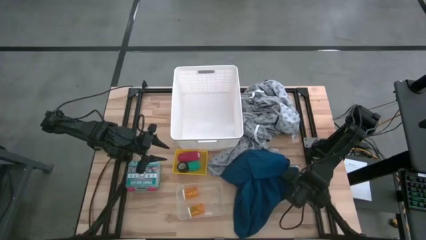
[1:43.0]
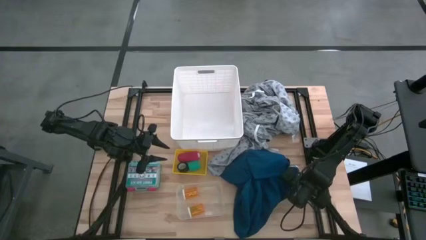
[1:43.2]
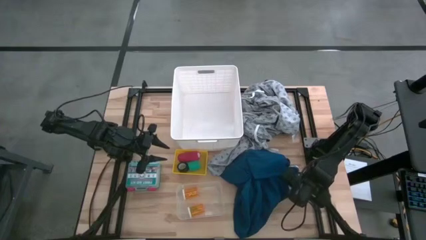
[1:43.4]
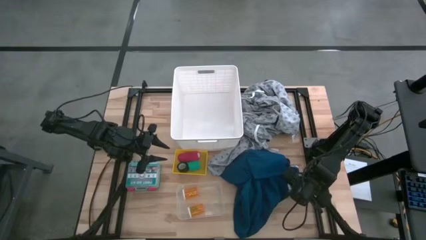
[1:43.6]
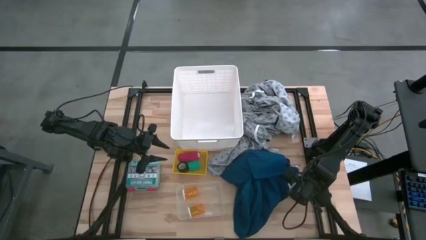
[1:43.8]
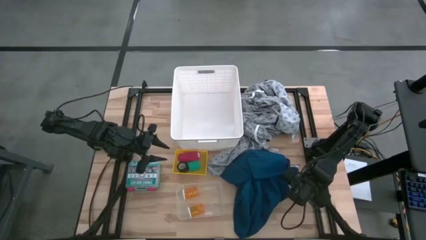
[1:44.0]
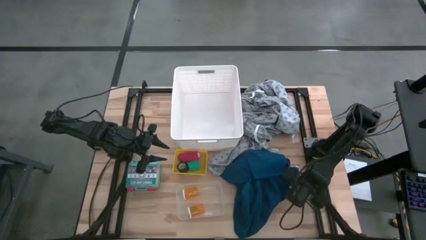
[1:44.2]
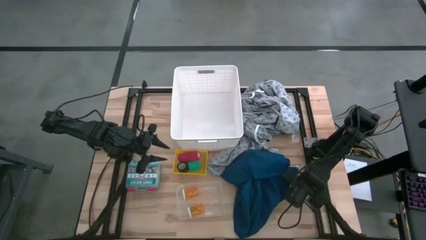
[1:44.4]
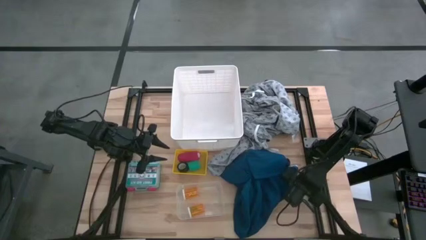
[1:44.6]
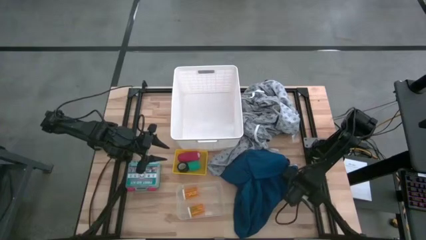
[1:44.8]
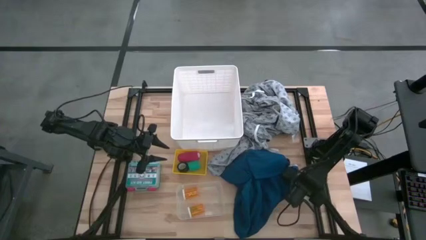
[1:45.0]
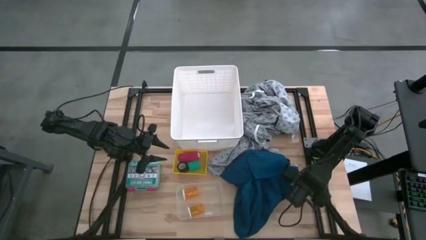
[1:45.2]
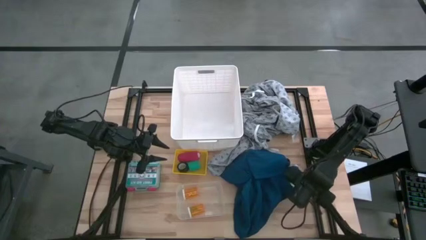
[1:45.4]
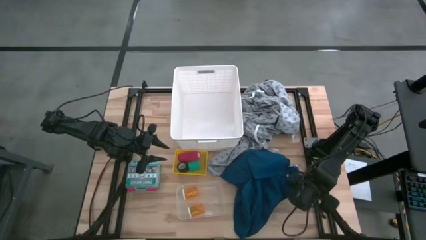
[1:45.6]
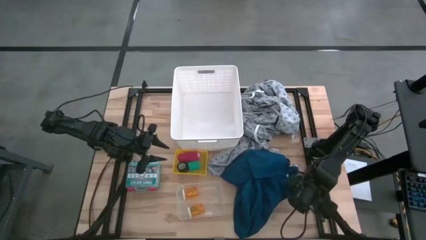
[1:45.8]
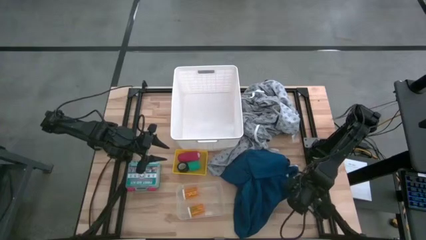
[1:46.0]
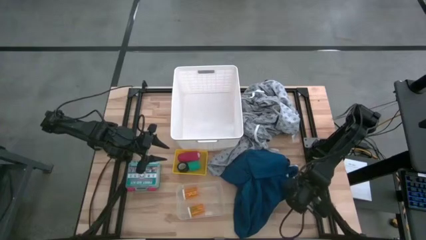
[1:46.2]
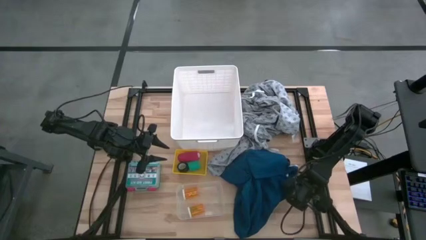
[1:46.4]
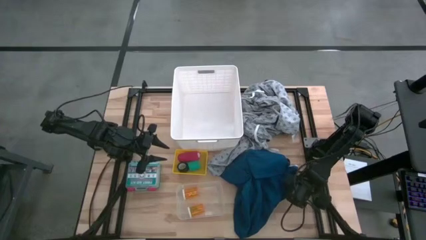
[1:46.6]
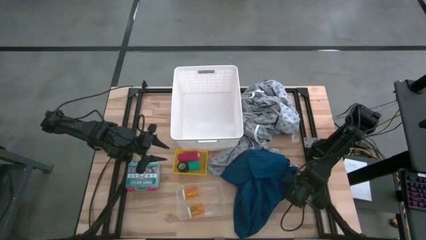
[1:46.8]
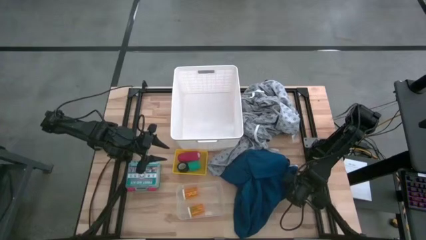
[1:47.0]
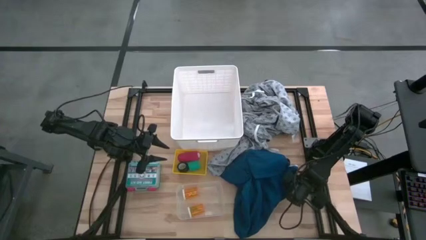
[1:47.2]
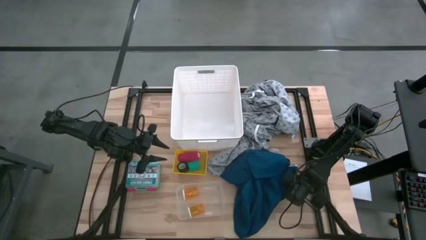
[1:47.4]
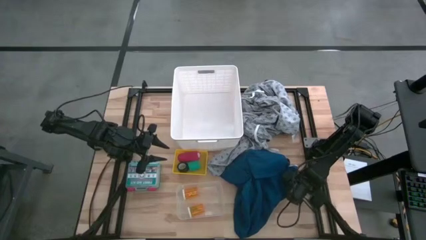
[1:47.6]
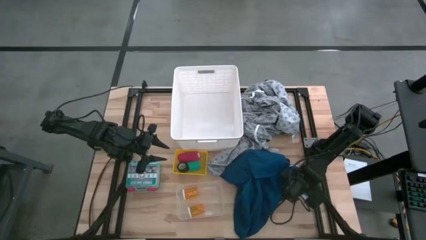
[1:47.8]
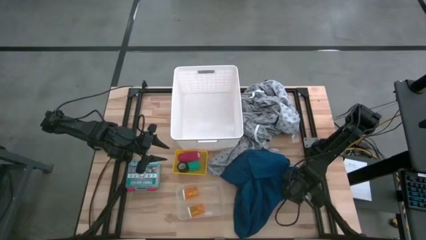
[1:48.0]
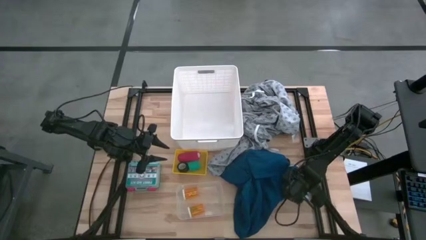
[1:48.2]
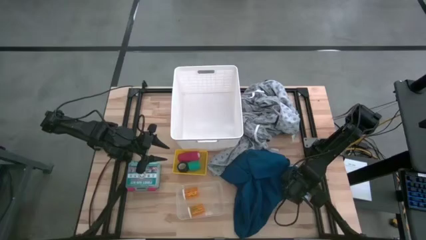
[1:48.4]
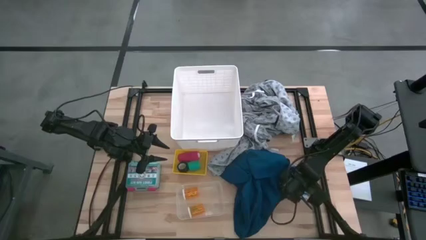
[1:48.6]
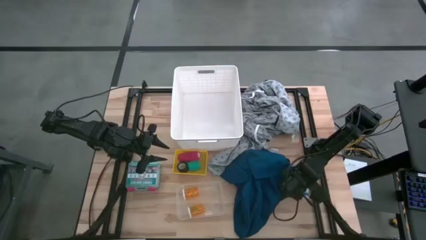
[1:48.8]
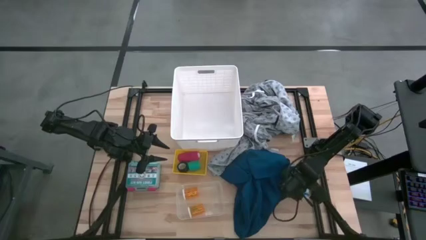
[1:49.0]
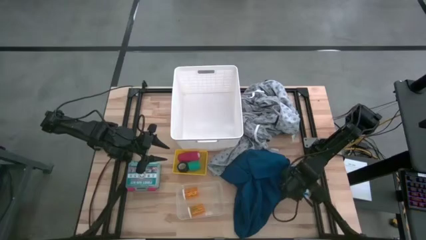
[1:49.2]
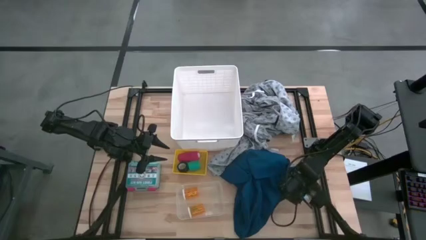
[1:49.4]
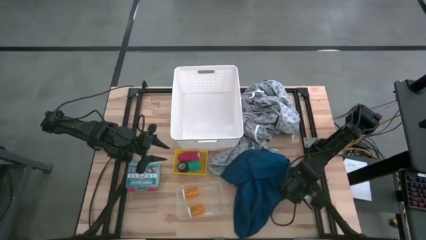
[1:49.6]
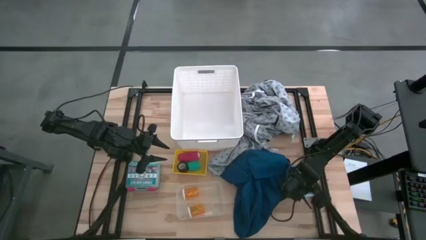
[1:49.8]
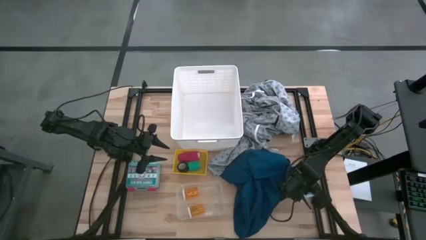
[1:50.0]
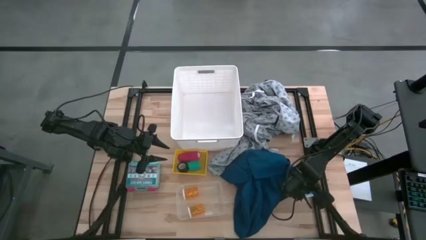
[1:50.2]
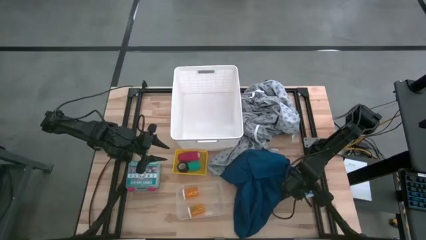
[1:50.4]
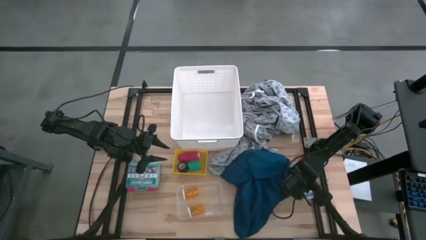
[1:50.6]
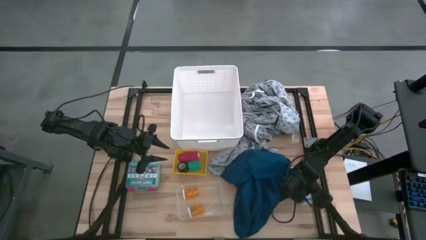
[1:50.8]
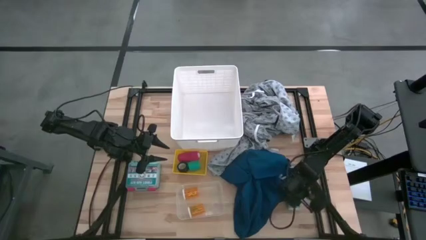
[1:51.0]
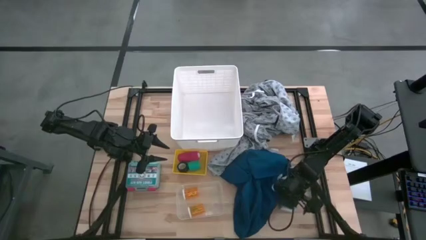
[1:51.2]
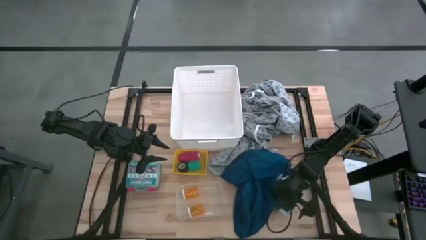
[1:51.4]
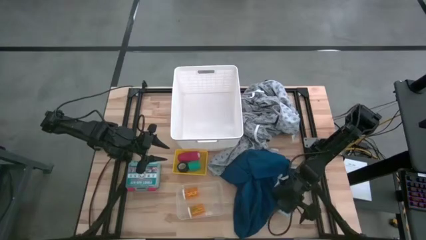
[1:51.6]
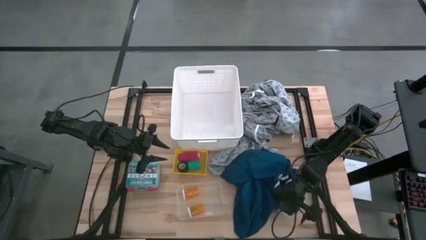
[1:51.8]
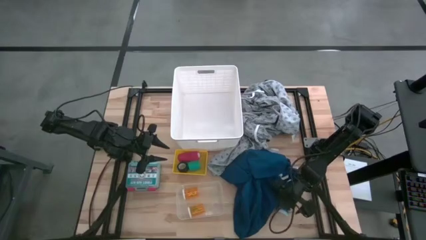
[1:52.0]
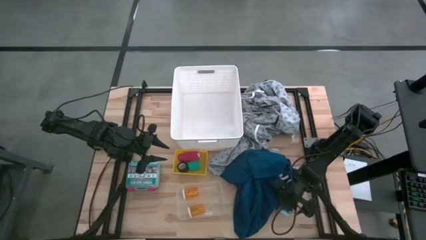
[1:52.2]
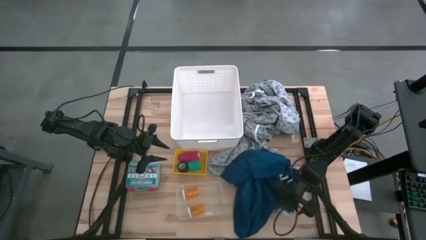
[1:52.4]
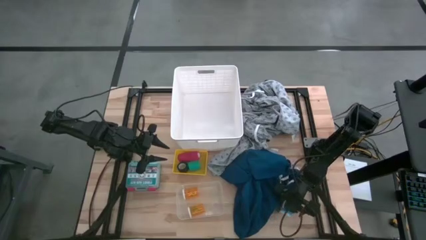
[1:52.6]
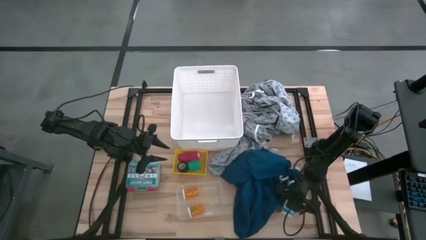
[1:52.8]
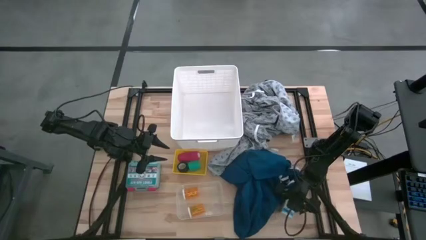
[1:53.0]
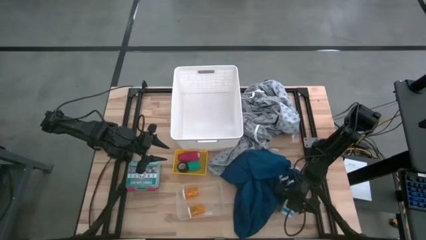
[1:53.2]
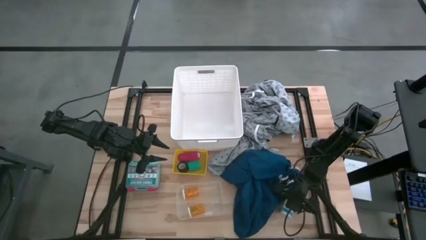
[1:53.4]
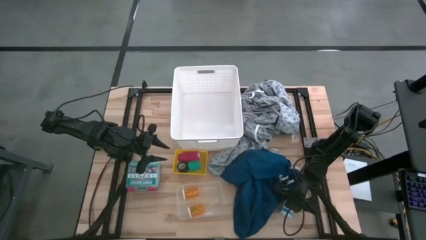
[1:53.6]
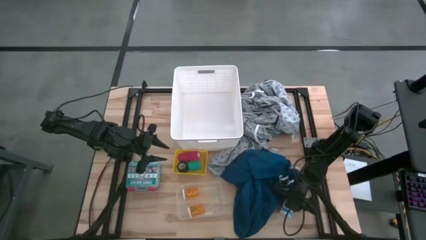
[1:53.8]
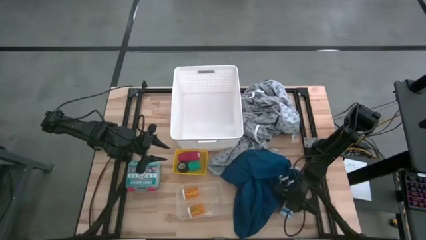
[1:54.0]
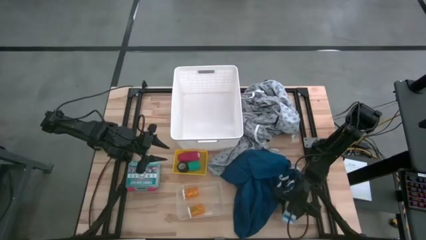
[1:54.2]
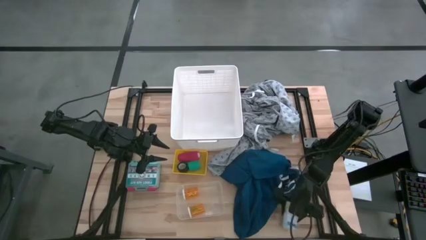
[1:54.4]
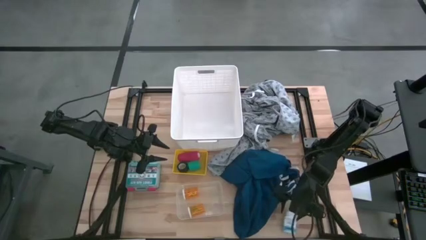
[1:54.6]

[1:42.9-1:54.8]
Task: Pick & Place Medicine items
Put the white medicine bottle into the transparent bin

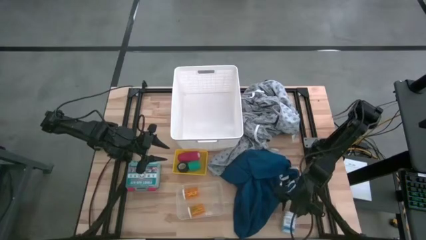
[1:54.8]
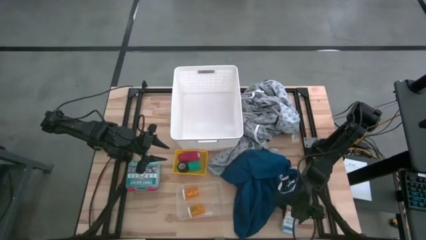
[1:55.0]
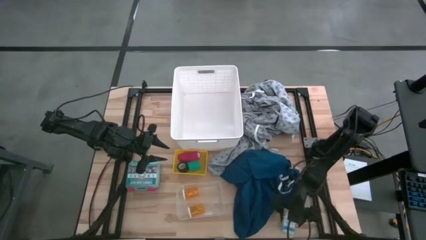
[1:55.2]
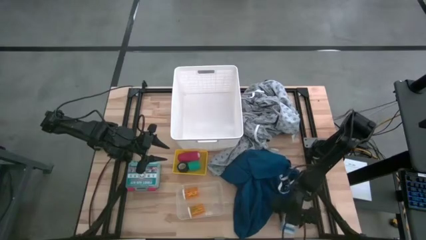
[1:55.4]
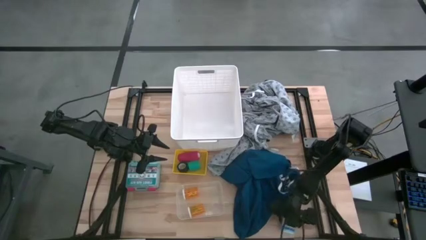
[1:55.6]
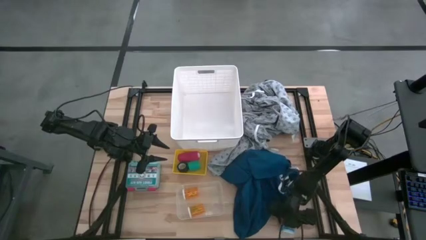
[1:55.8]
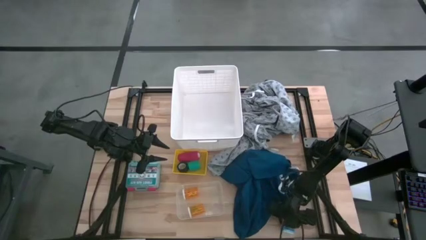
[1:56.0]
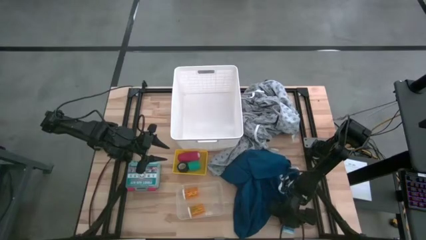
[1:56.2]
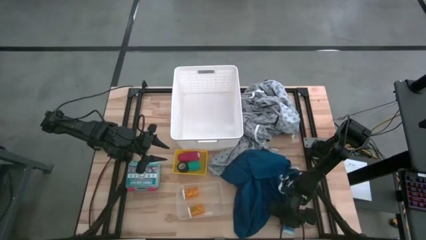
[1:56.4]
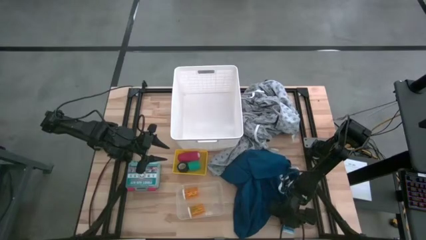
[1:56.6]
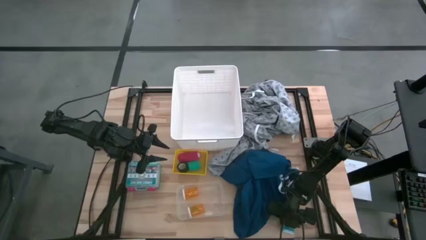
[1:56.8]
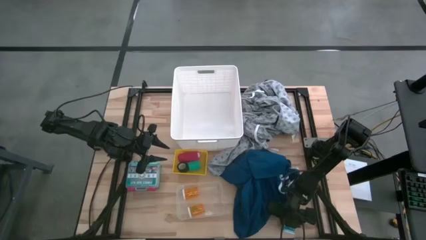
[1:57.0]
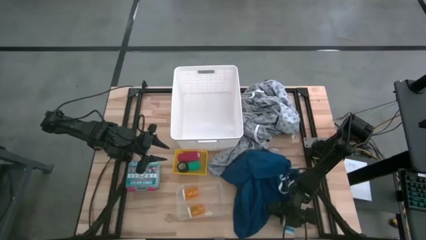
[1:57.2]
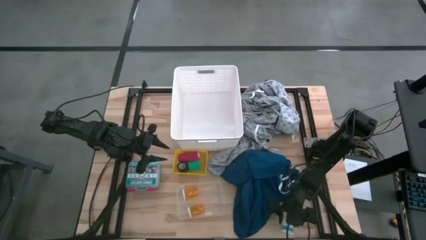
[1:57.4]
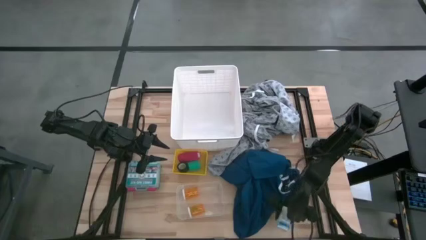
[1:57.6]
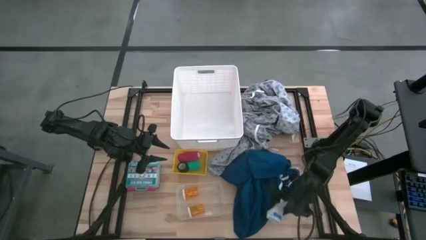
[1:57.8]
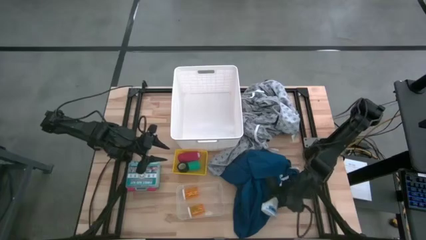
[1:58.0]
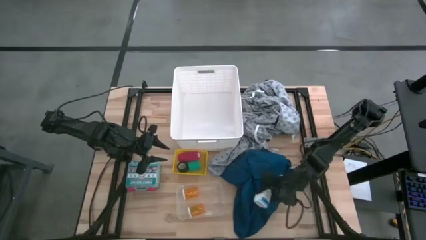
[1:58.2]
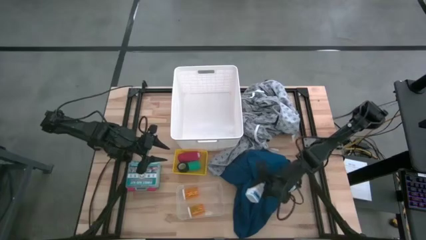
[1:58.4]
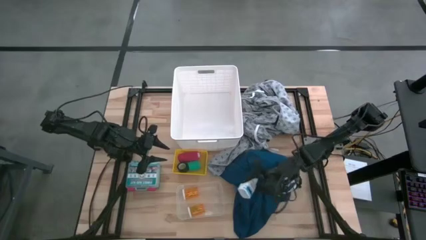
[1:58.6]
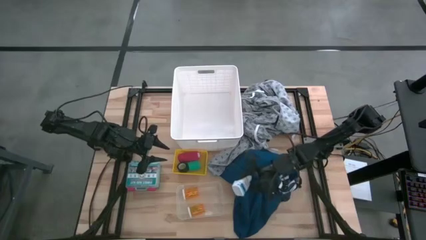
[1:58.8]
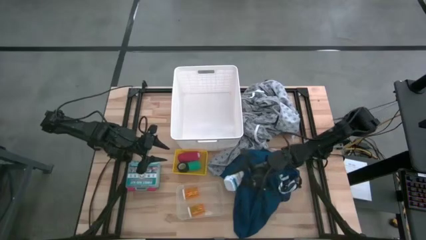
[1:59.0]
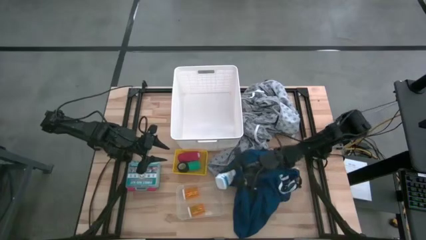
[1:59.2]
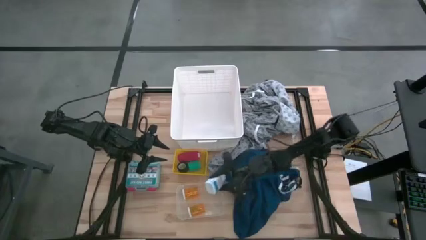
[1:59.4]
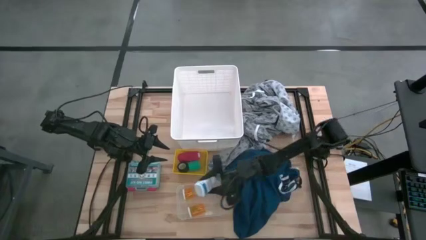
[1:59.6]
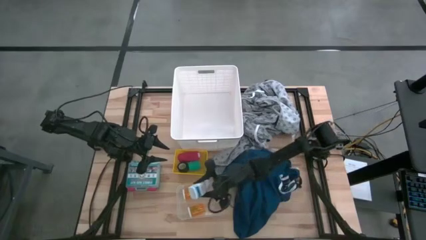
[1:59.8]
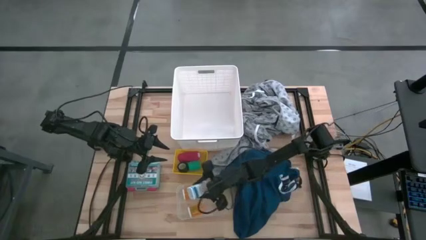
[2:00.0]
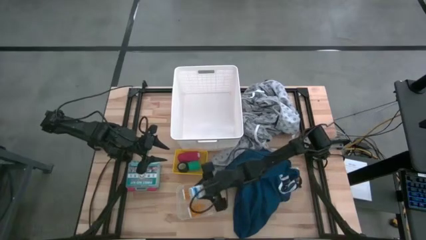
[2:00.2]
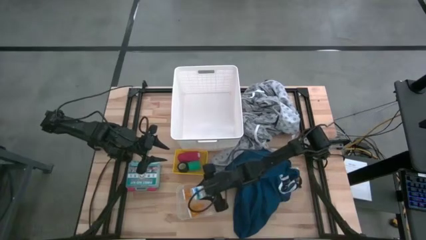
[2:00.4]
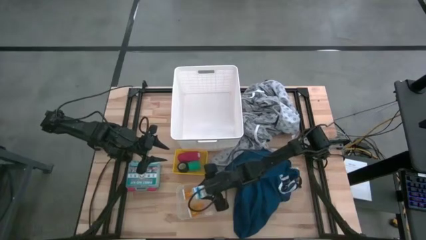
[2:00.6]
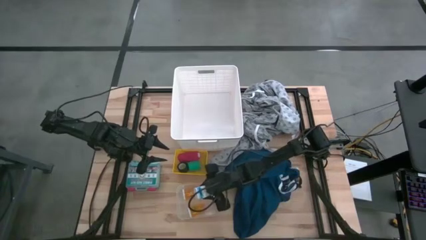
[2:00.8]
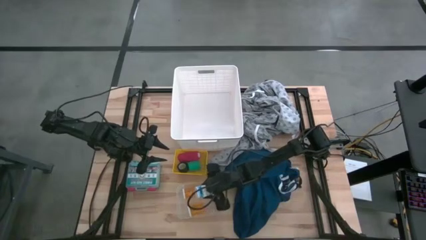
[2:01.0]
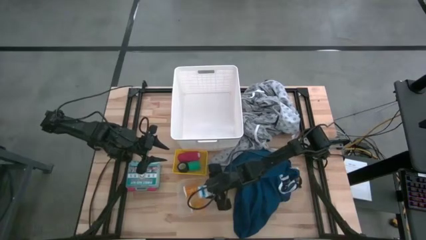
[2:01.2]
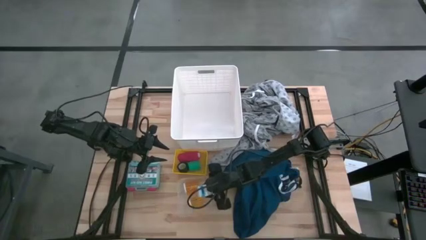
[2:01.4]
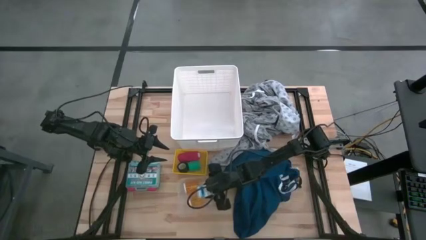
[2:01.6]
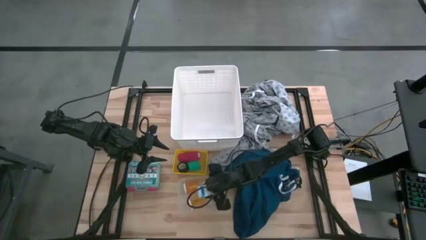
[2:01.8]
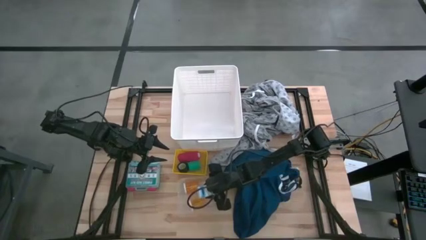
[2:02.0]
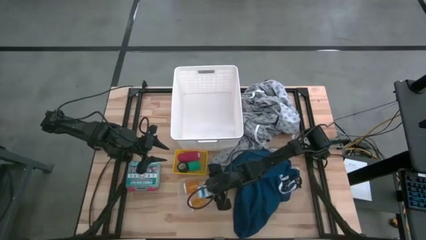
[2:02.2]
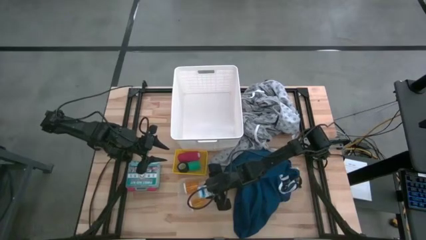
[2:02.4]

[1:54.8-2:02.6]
Put the white medicine bottle into the transparent bin
